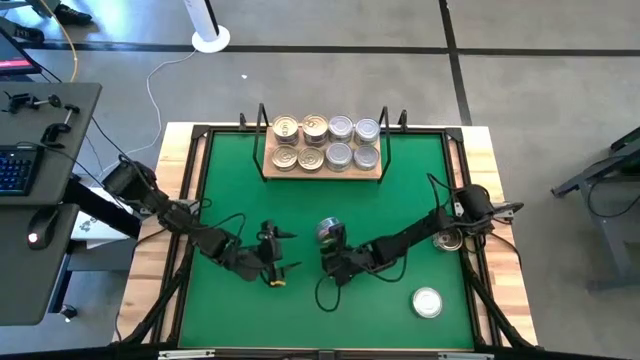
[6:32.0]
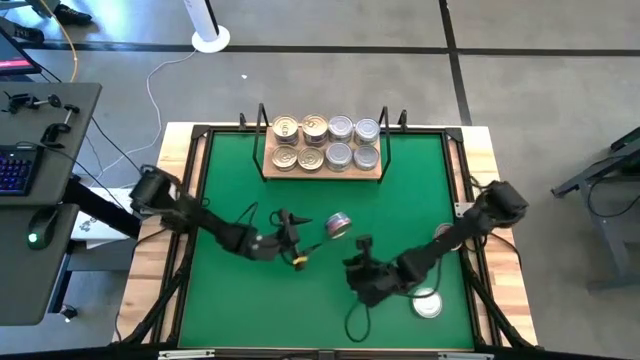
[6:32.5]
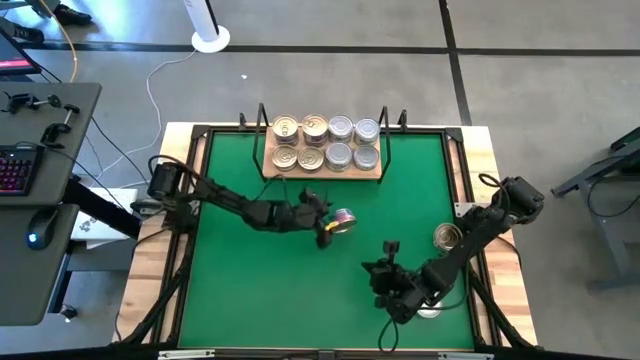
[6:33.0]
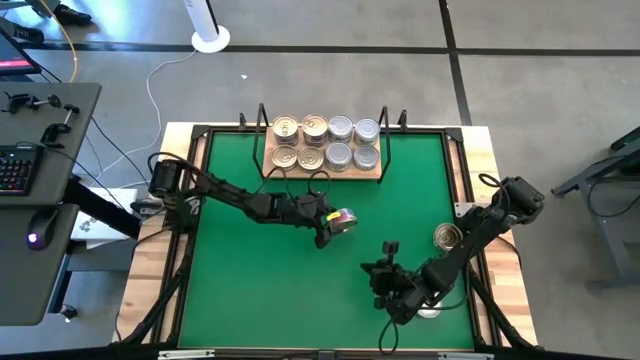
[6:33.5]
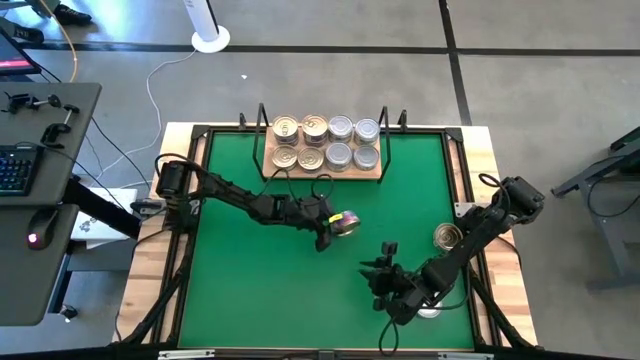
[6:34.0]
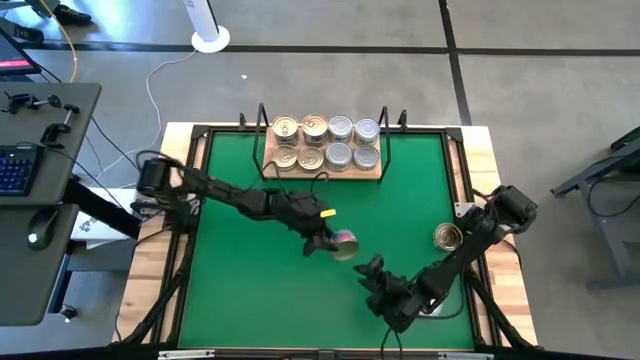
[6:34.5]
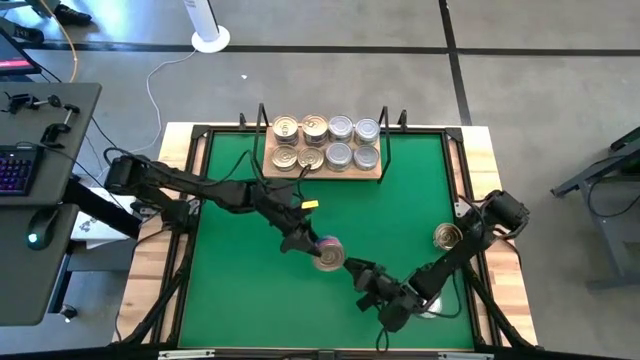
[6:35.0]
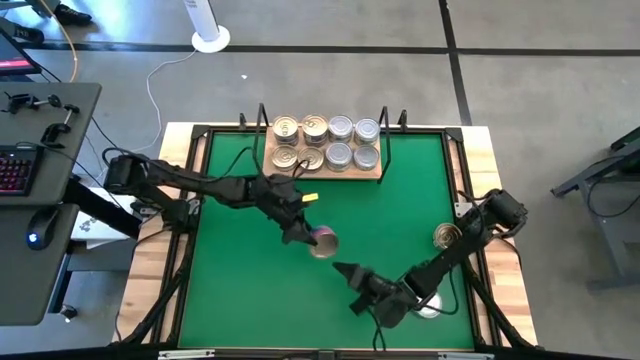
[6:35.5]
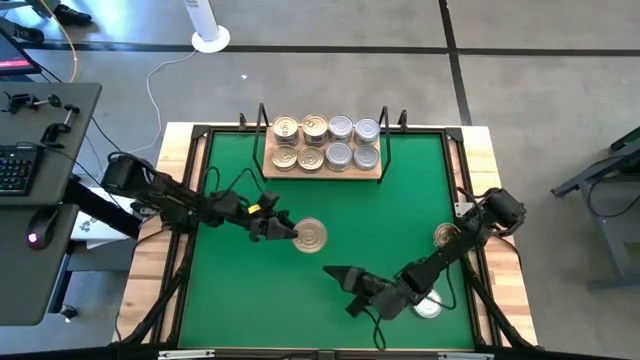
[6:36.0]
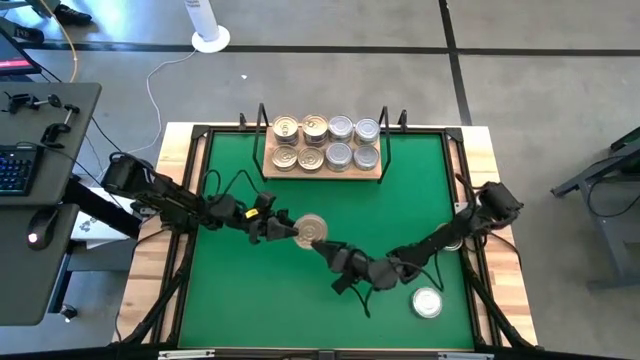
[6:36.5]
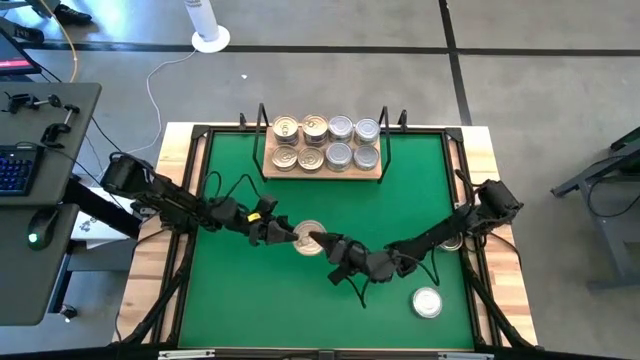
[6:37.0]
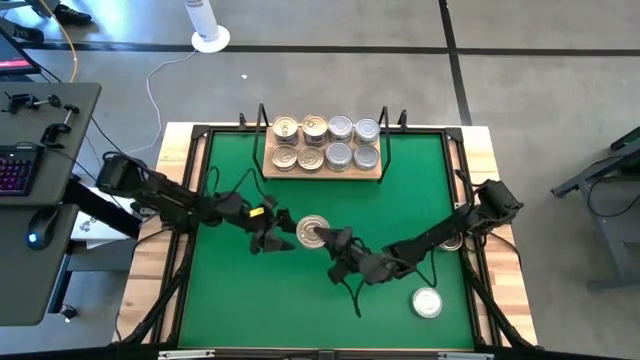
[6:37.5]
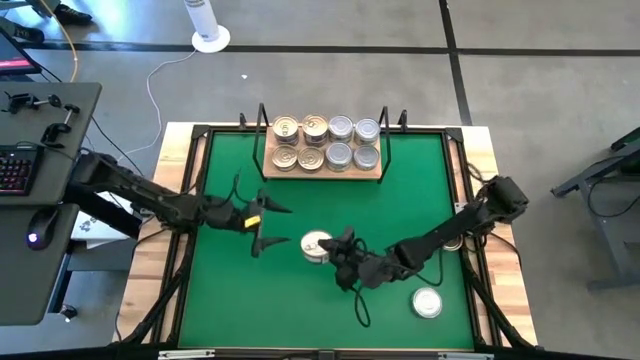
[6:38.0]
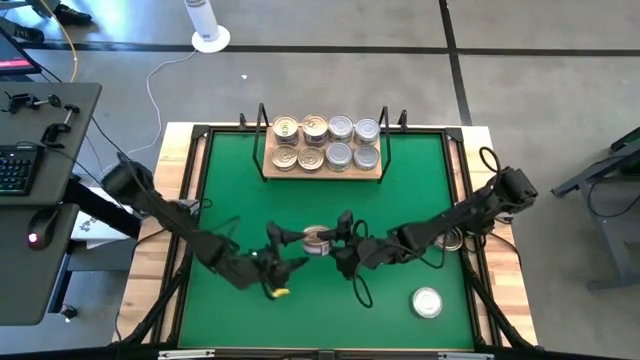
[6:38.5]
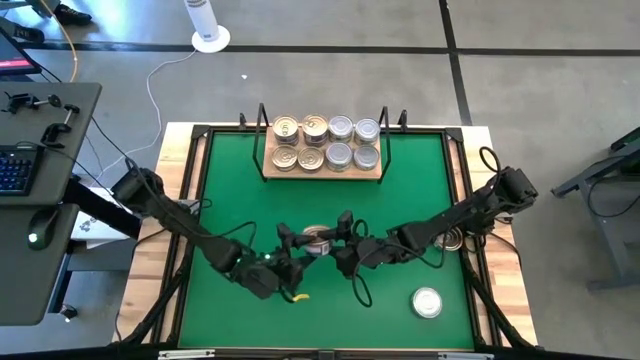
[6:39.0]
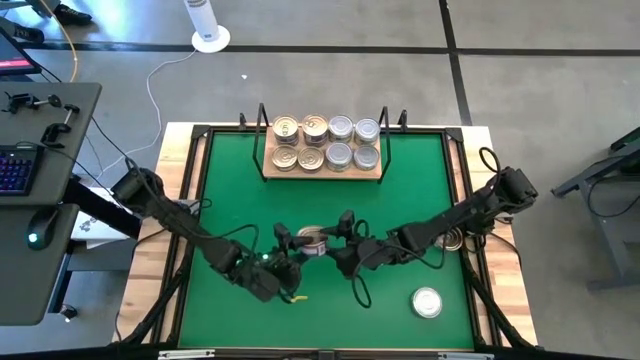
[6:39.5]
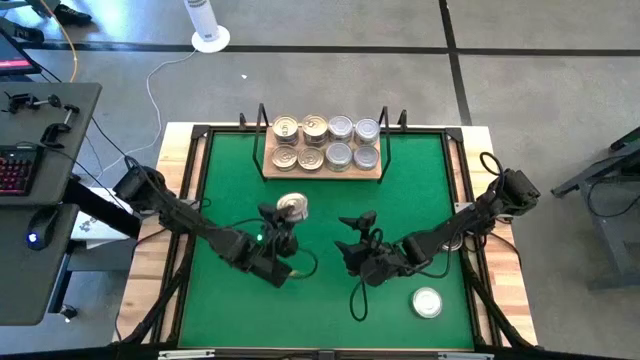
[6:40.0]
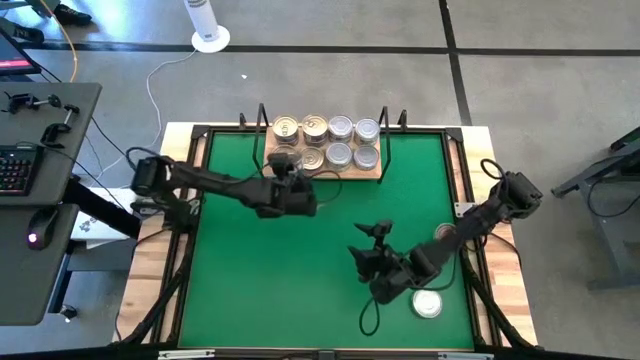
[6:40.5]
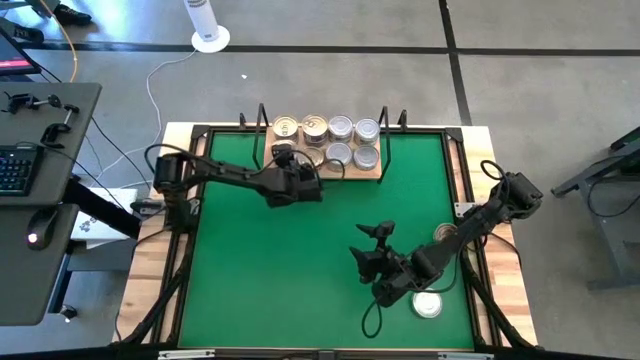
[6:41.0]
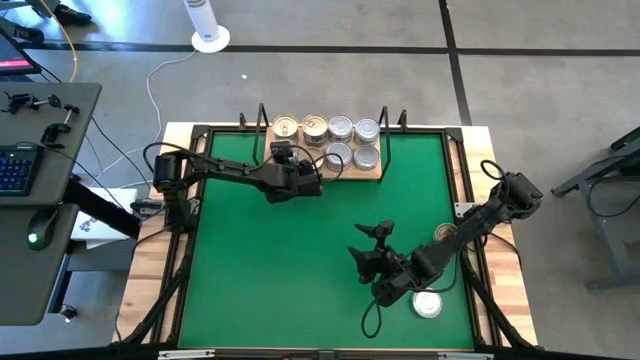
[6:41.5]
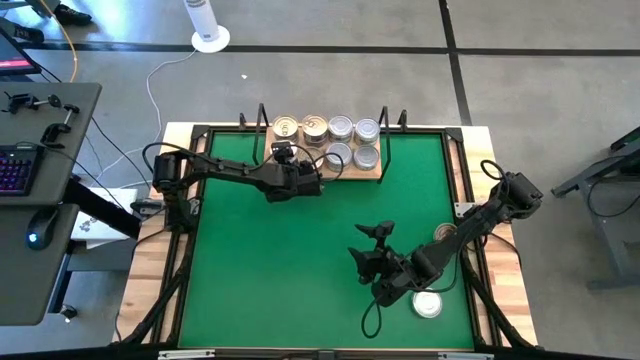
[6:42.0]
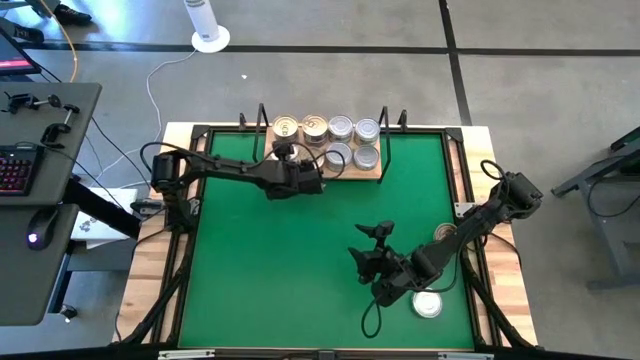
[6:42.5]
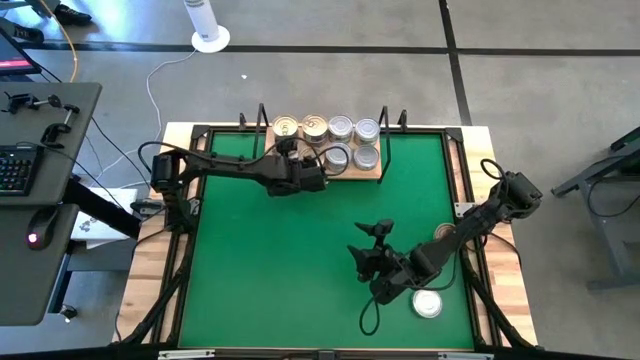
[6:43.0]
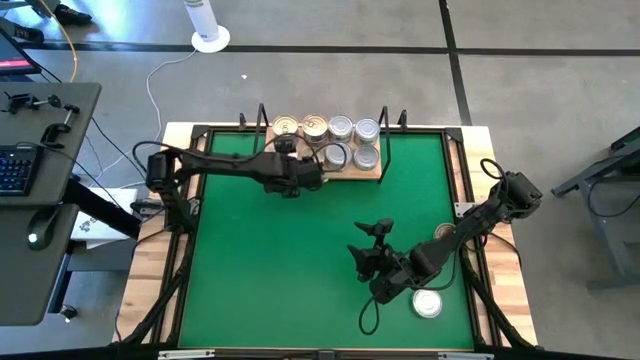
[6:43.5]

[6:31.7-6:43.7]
Task: Stack canned seafood by type on shelf
Stack the blue/pink tuna can on top of the other blue/pink tuna can on the shelf

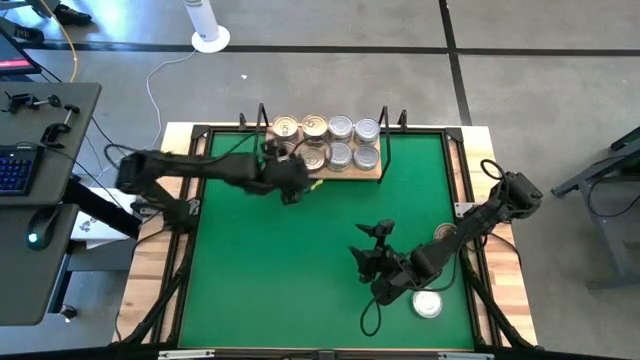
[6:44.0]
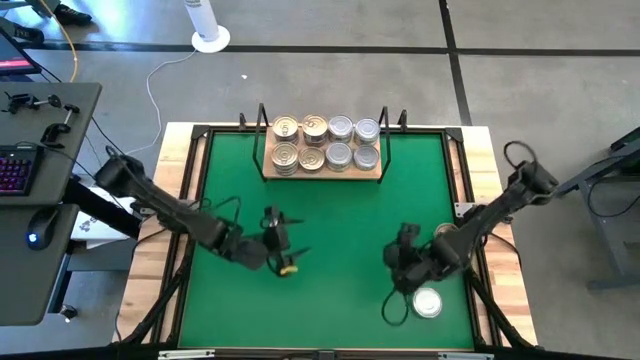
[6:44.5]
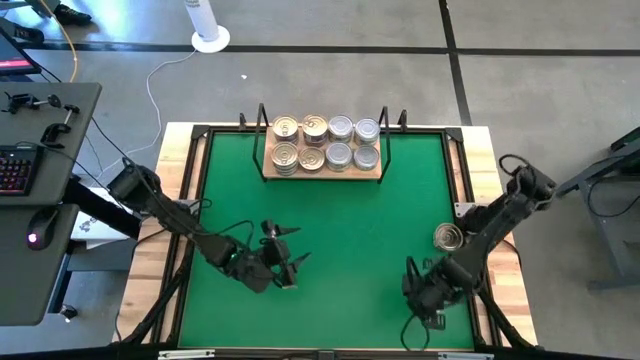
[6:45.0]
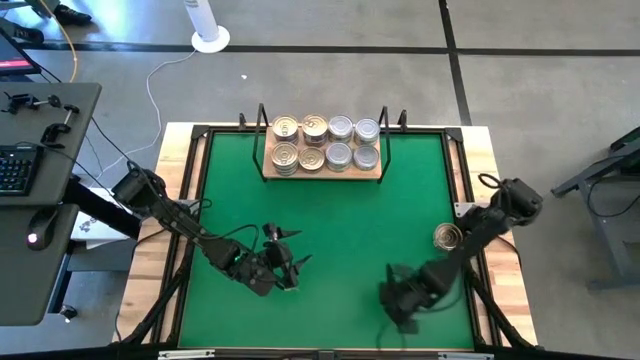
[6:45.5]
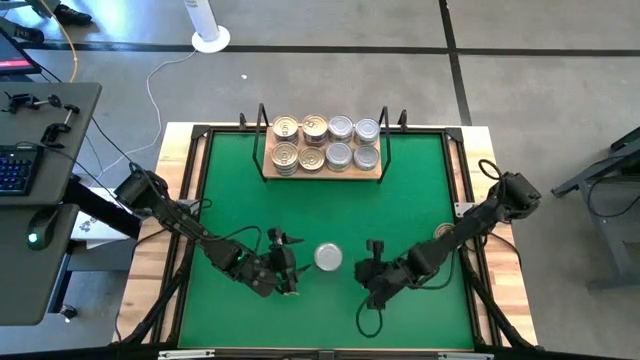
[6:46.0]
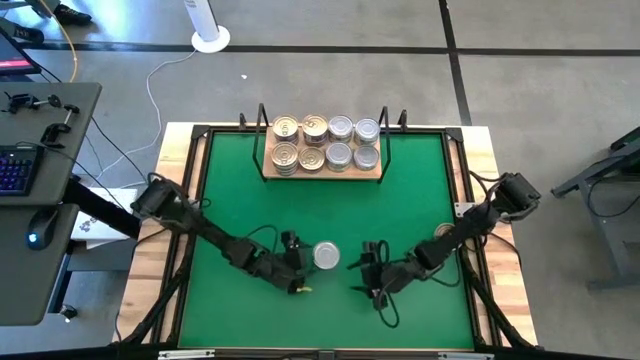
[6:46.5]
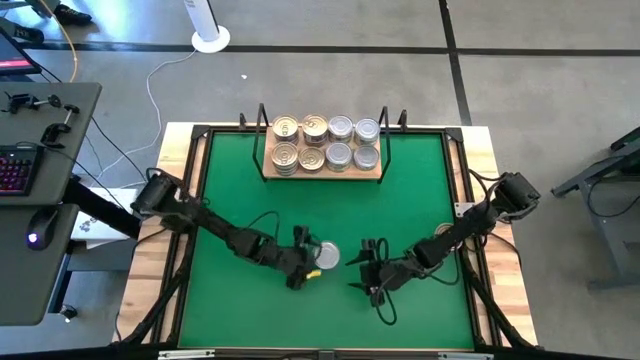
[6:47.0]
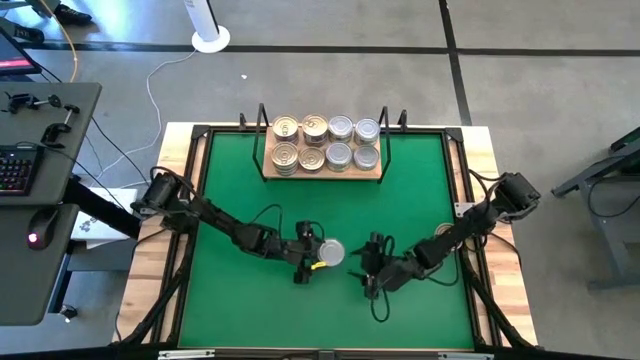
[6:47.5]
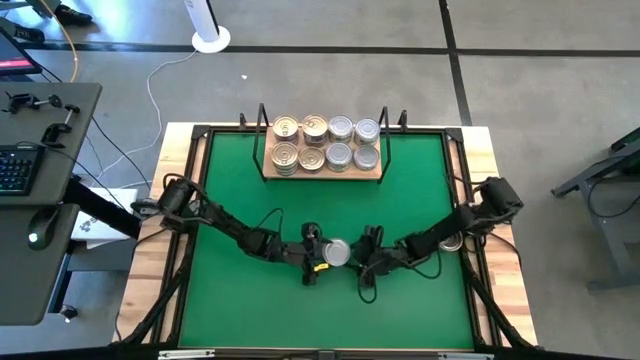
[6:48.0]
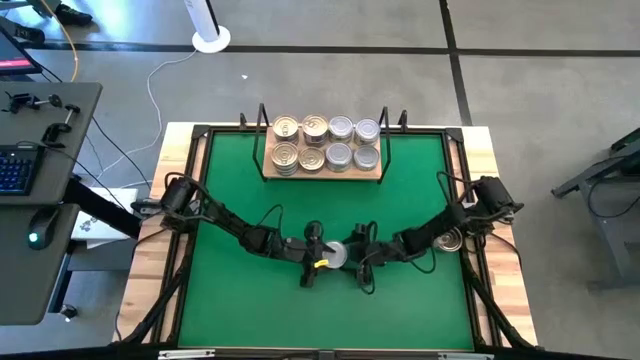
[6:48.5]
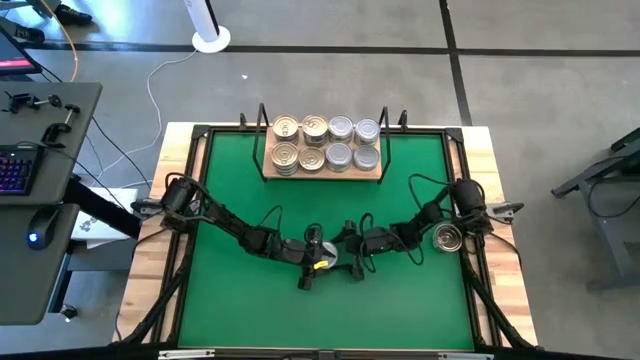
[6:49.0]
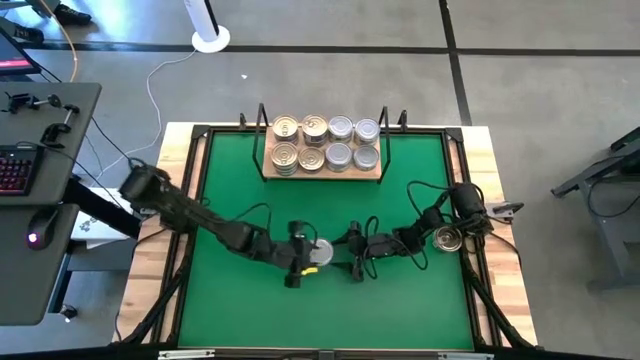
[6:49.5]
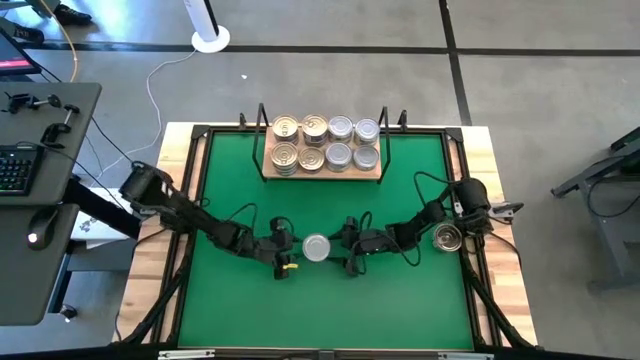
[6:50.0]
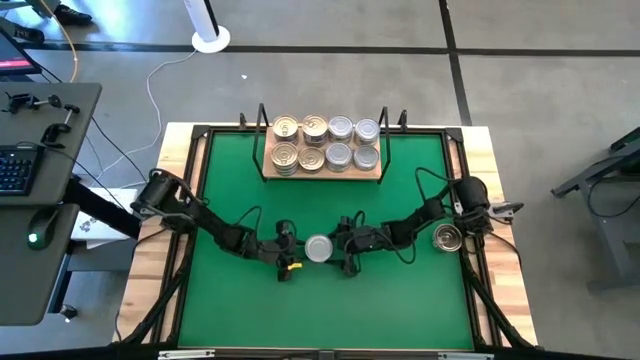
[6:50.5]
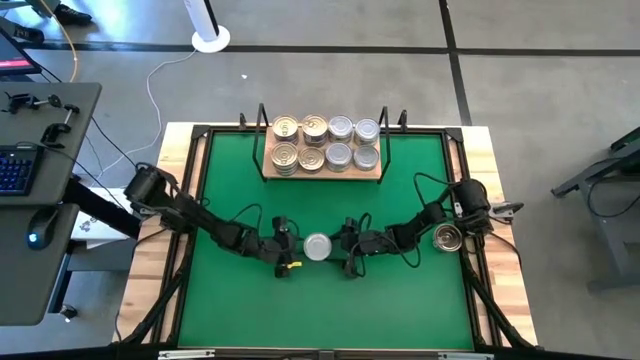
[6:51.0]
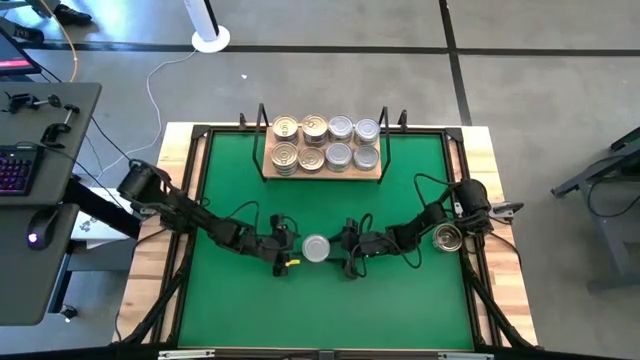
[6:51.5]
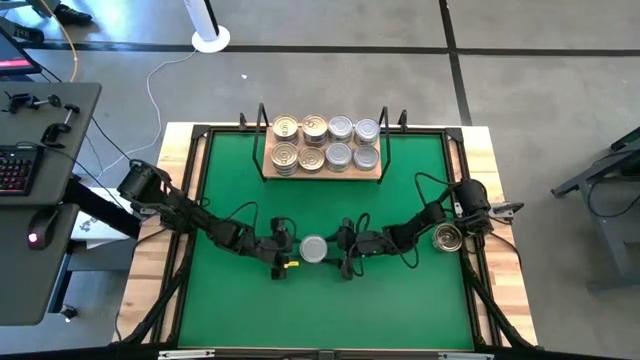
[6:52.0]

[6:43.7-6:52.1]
Stack the green tuna can on top of the other green tuna can
